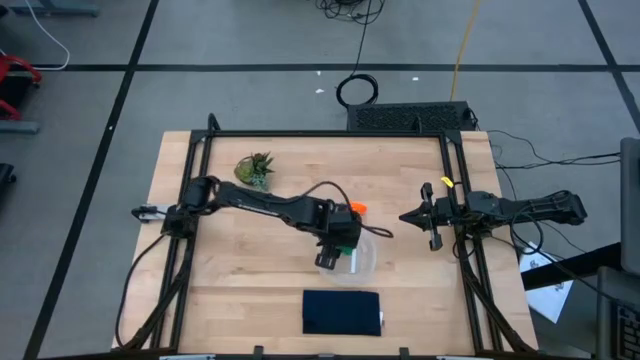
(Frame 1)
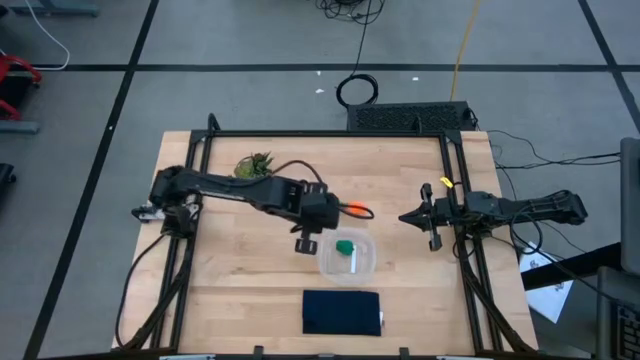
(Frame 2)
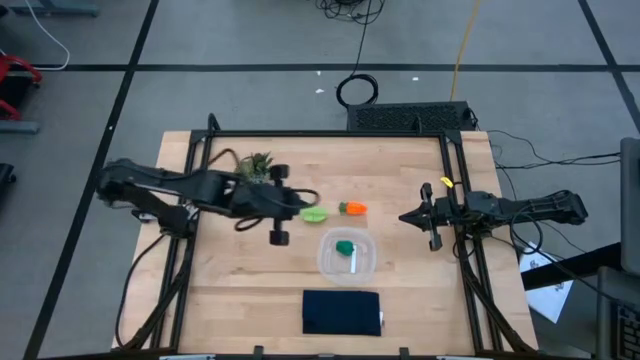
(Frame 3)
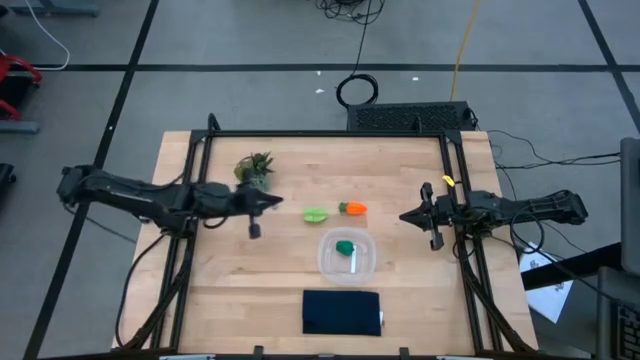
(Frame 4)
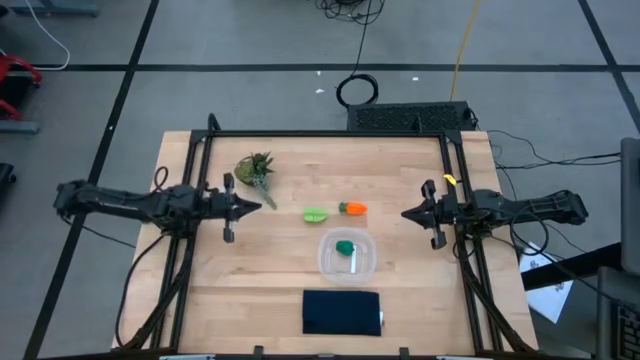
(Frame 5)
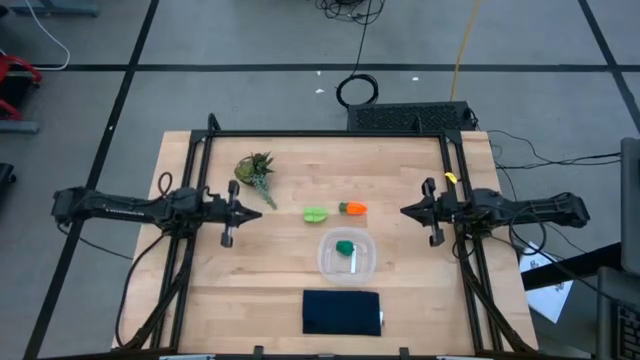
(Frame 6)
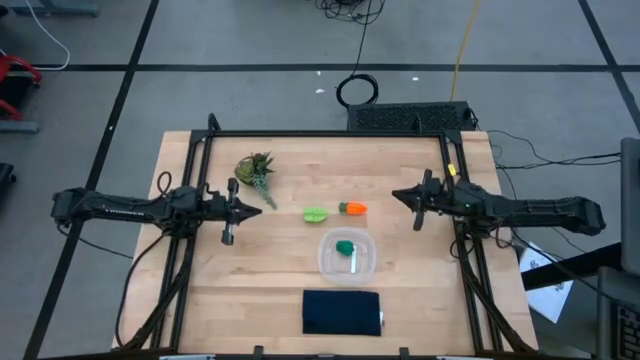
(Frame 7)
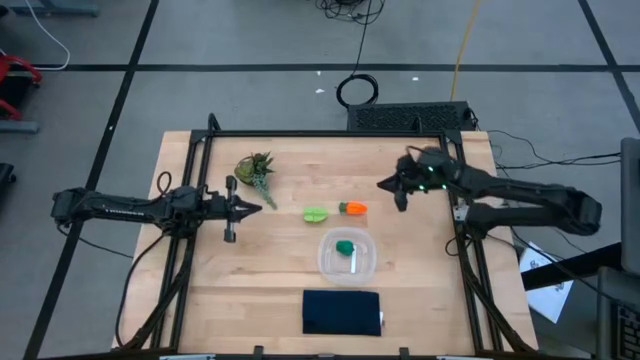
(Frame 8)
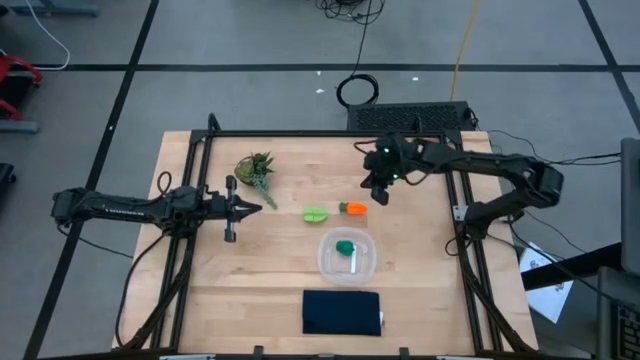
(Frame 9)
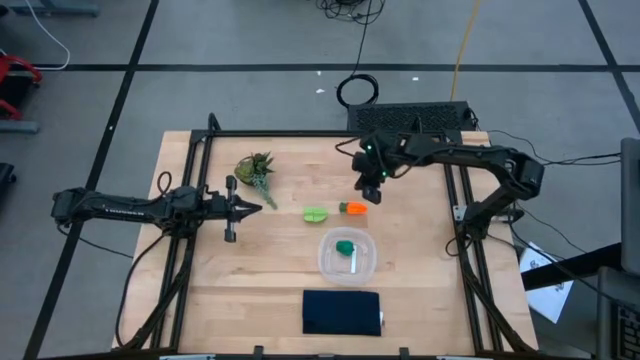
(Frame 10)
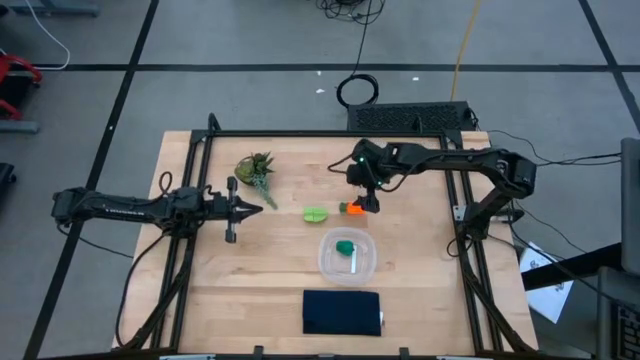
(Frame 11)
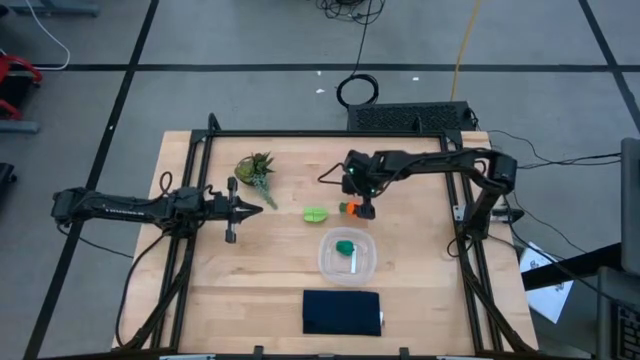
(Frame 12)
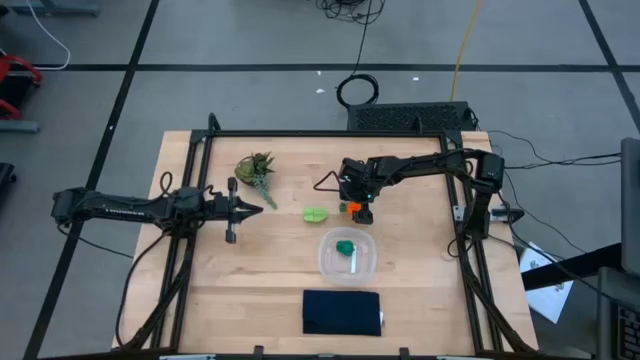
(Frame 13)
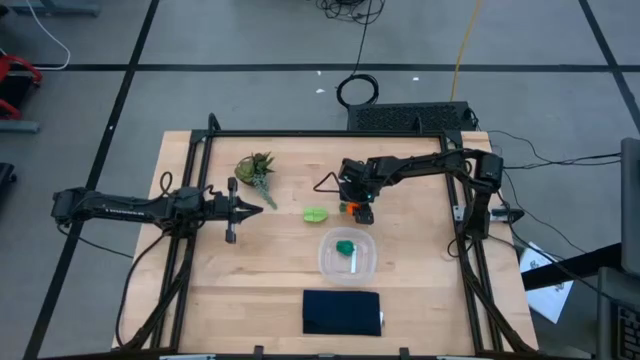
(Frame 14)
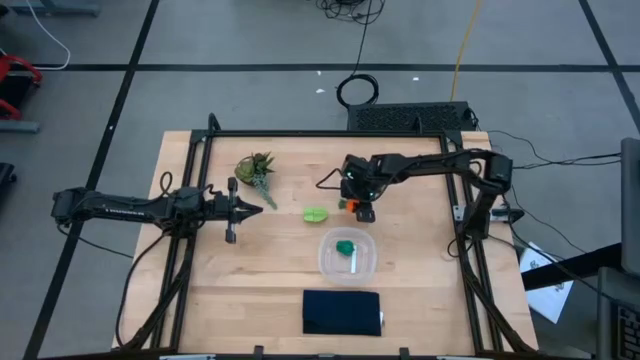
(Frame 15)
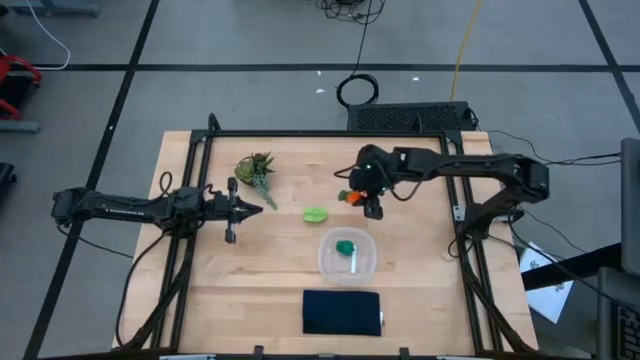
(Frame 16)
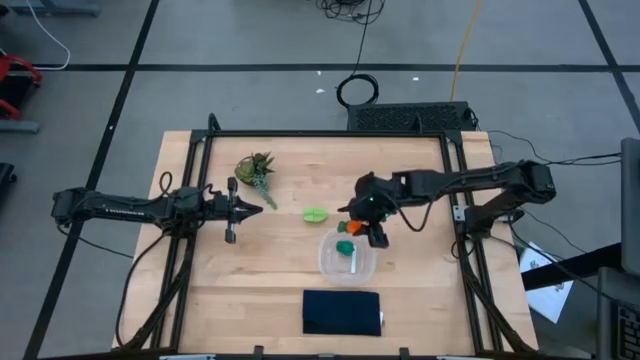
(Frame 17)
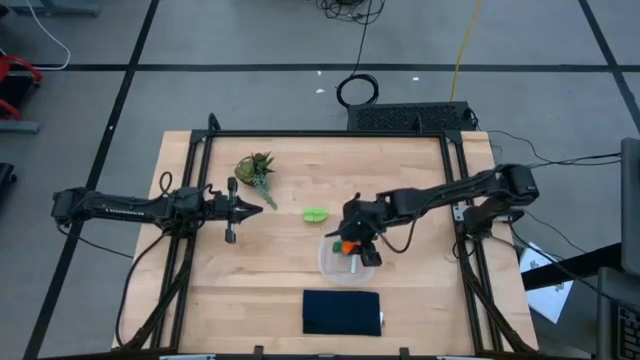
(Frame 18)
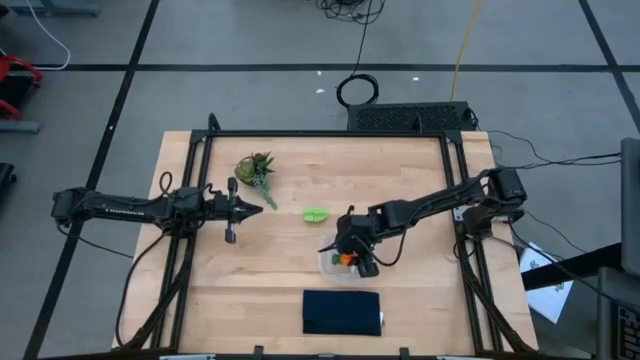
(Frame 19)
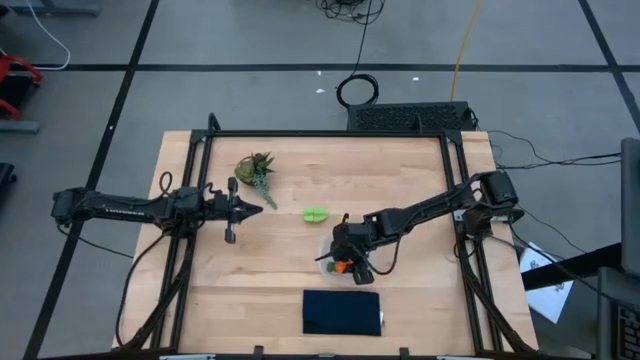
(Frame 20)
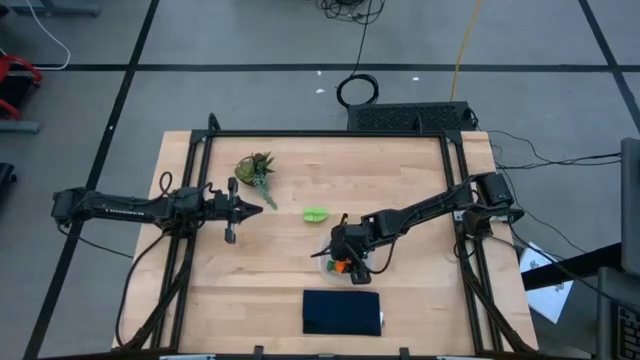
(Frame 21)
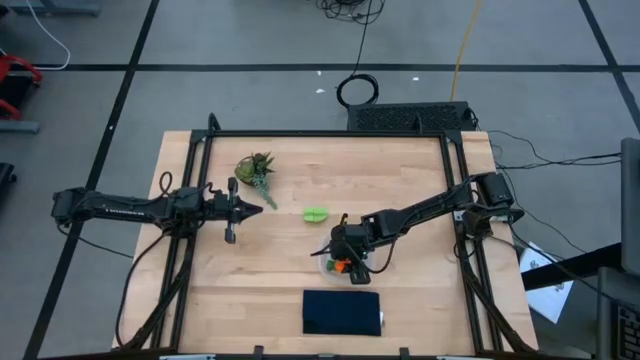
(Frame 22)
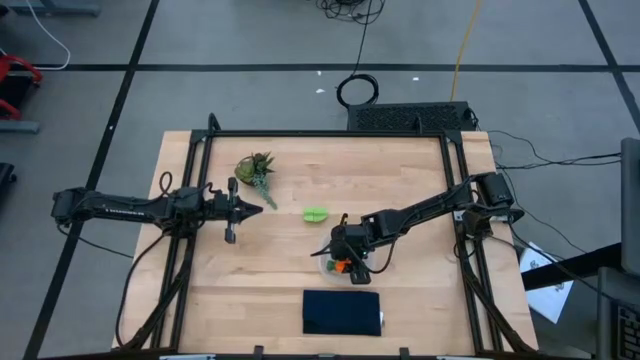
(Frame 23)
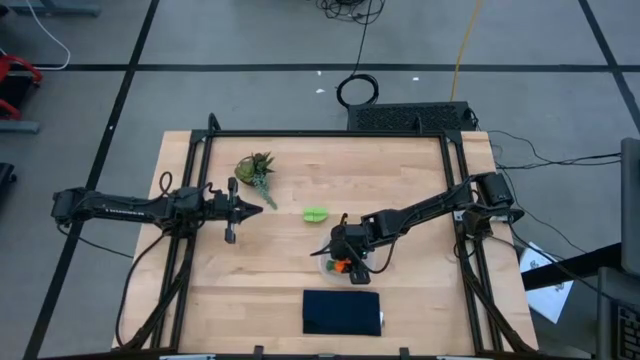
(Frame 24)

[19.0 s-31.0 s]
Task: Pick and placing Produce into tupperware
Put the orange carrot into the transparent bin

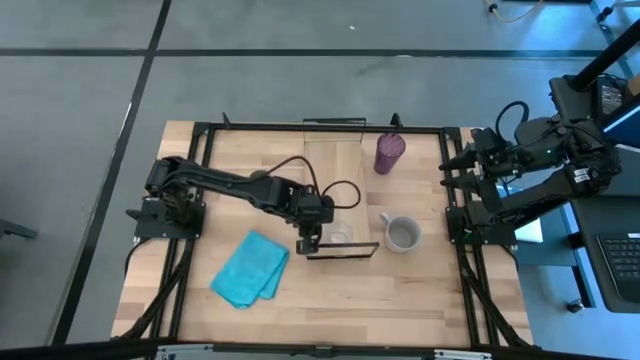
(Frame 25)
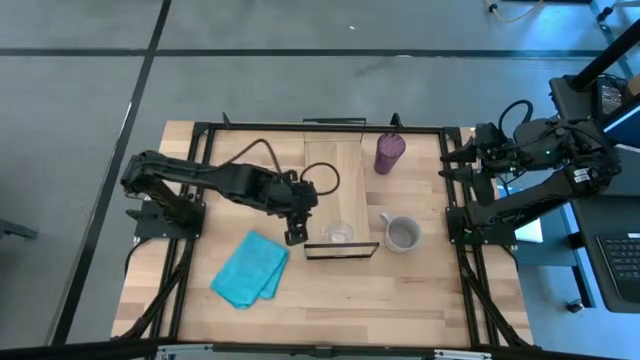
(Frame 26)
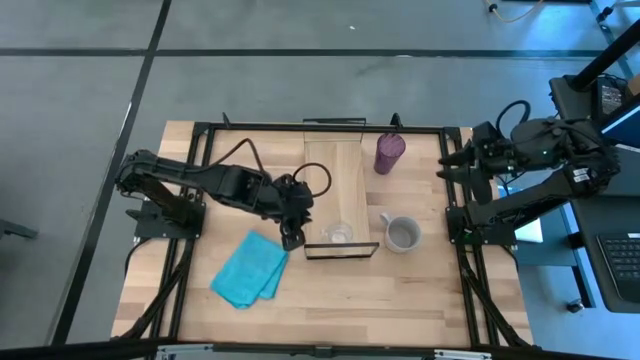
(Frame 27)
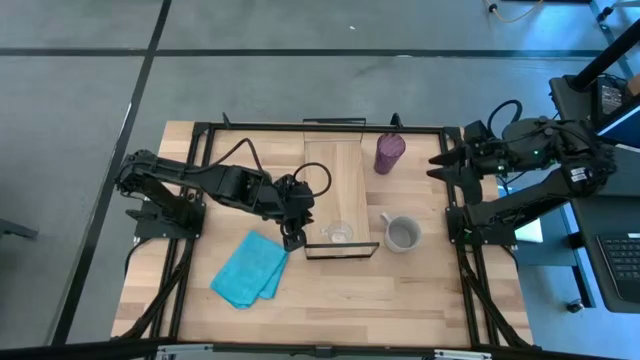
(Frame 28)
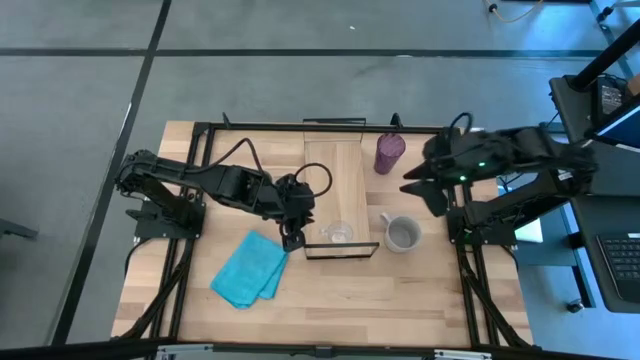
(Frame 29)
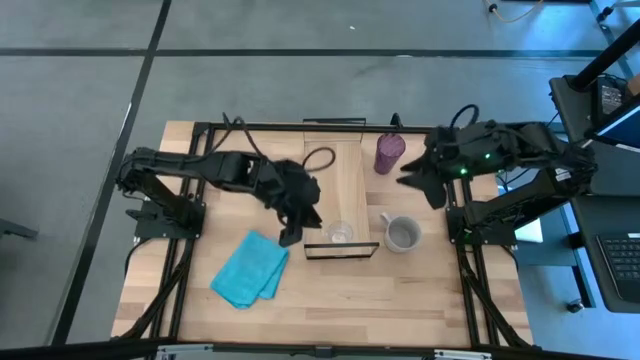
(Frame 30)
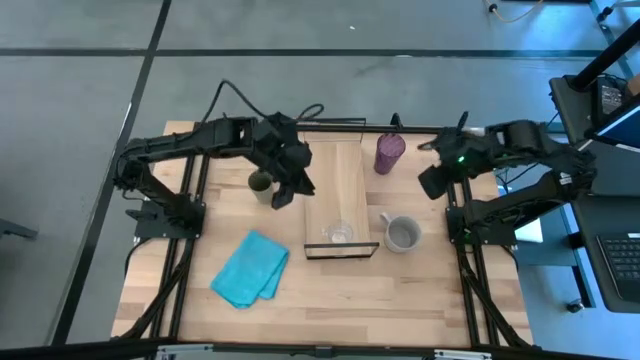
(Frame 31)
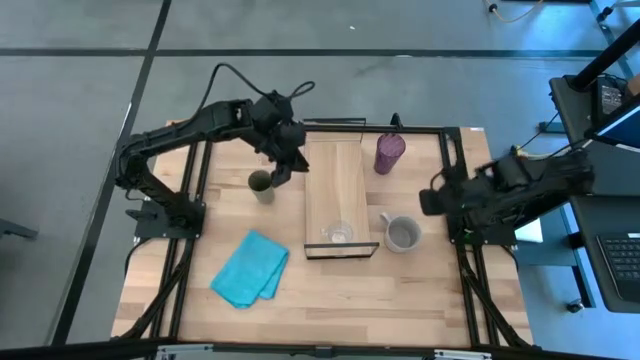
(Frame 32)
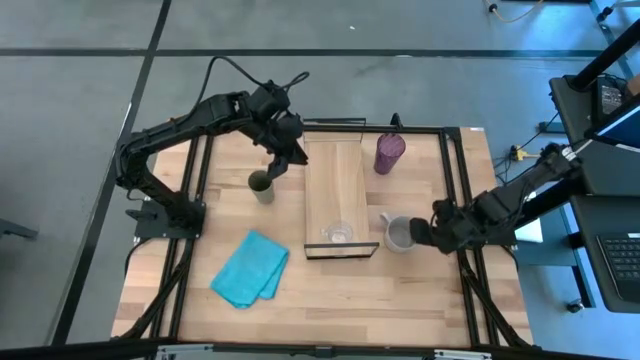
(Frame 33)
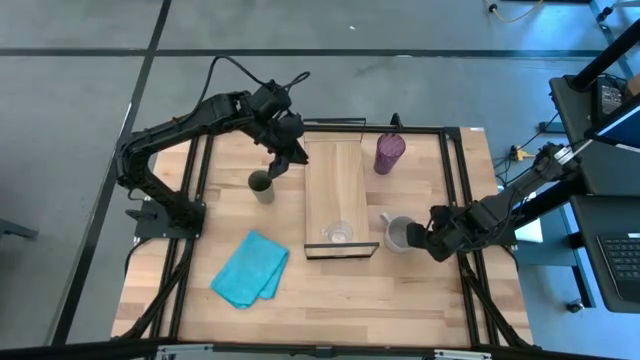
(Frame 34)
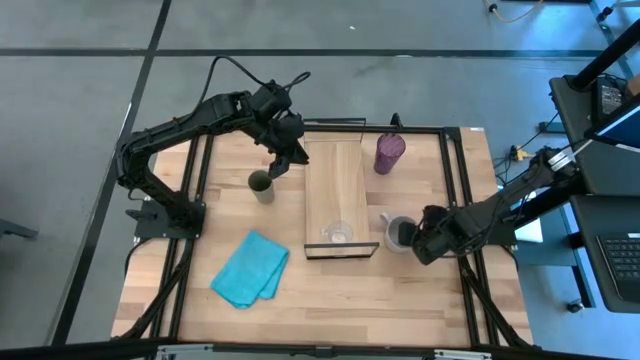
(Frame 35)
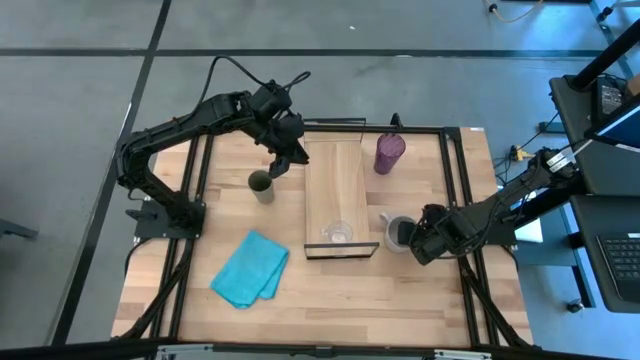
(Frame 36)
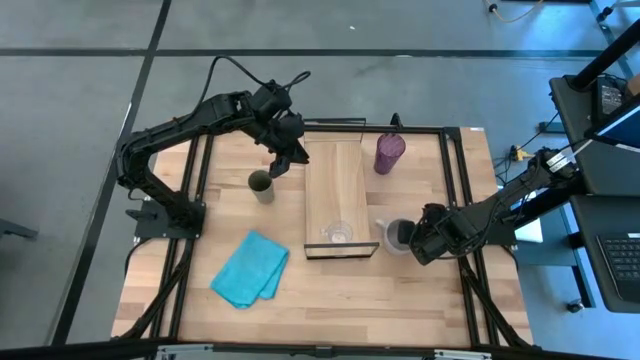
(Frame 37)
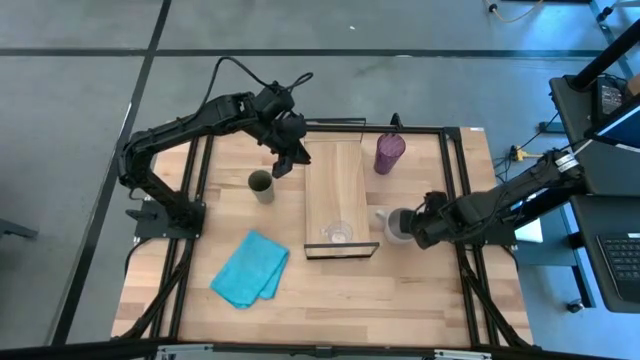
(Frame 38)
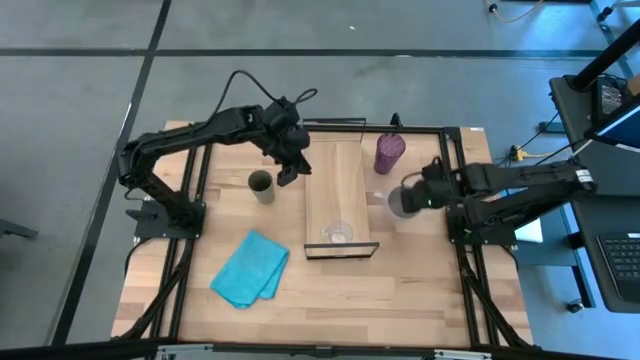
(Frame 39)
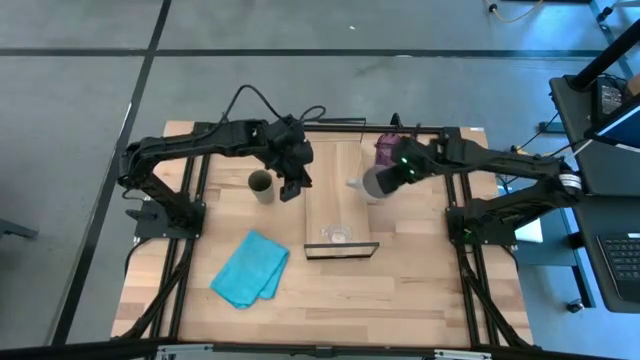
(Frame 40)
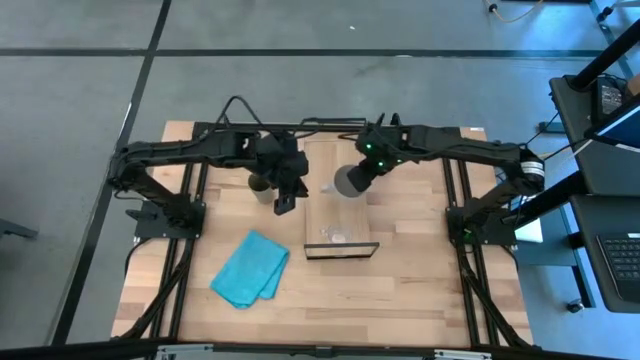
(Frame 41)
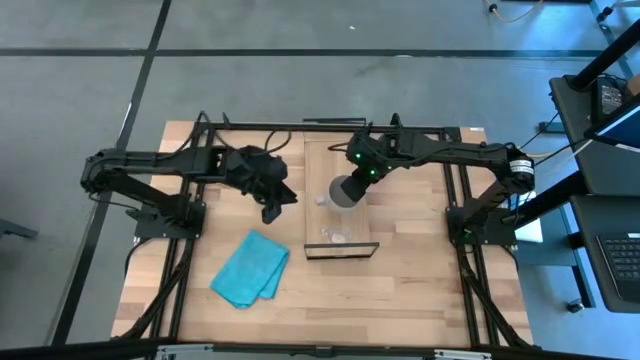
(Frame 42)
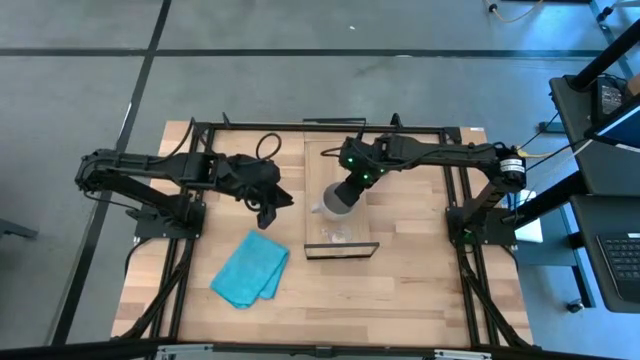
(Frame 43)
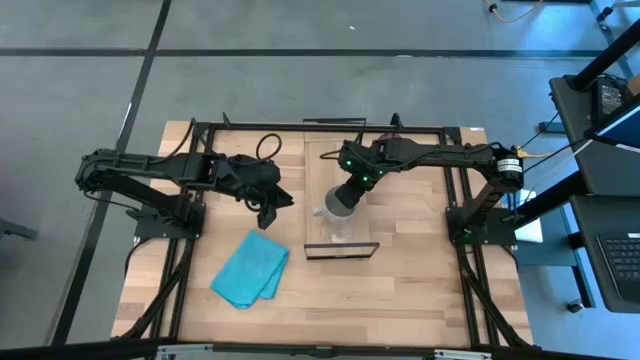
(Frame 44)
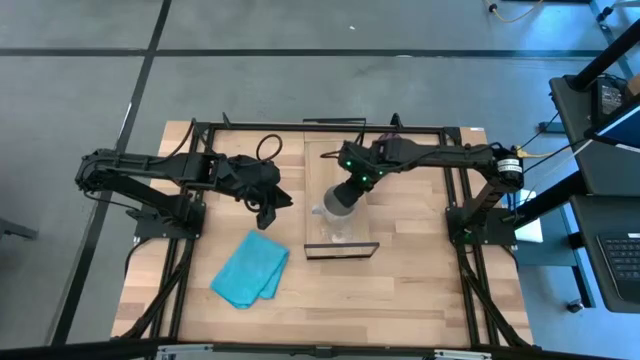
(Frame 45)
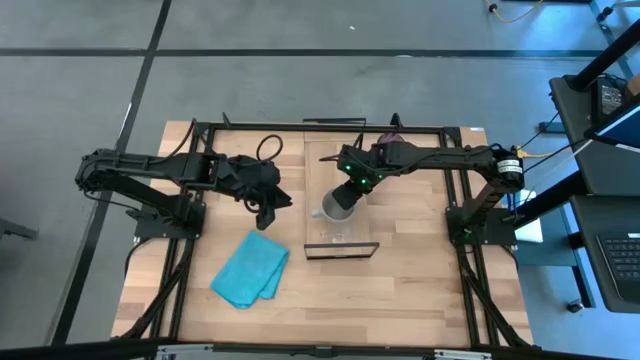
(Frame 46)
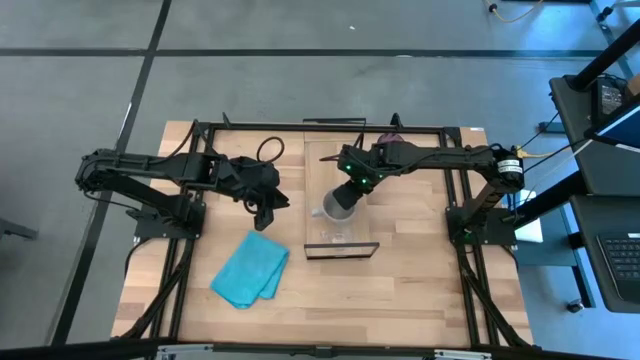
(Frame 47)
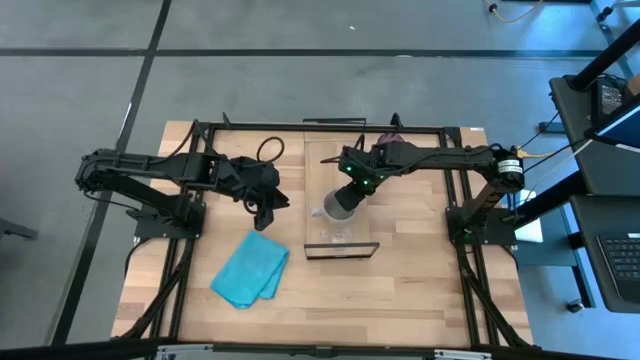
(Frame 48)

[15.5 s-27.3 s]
Task: Stack small to large cups/mugs on shelf
Put the white mug on the shelf
